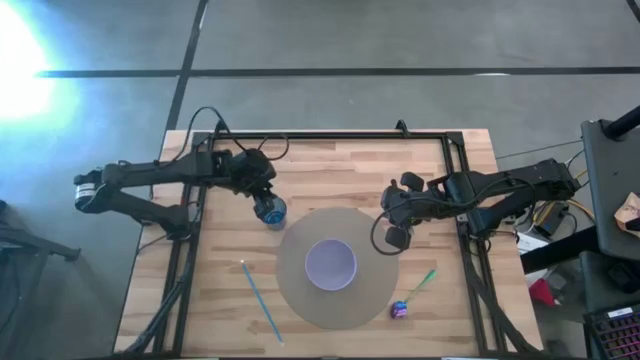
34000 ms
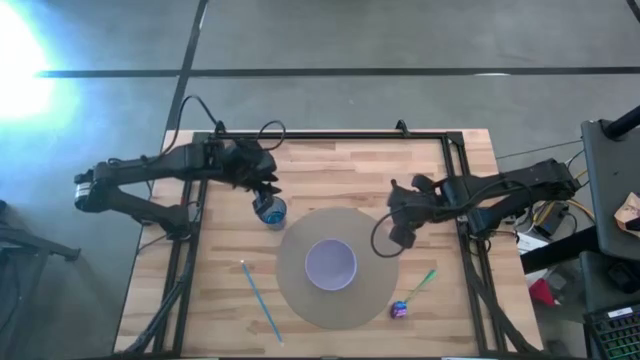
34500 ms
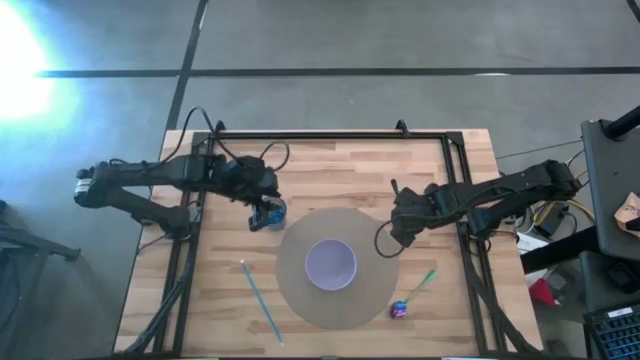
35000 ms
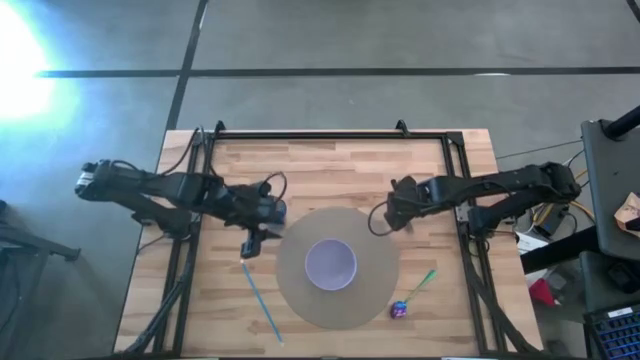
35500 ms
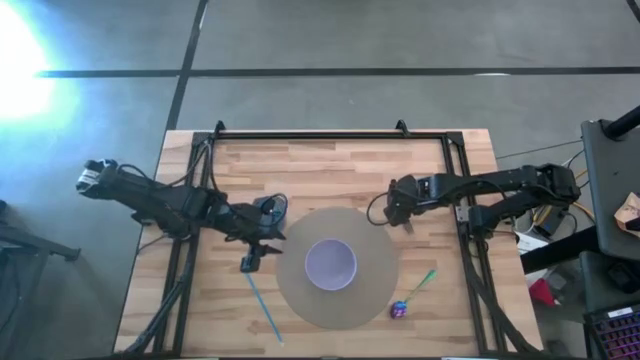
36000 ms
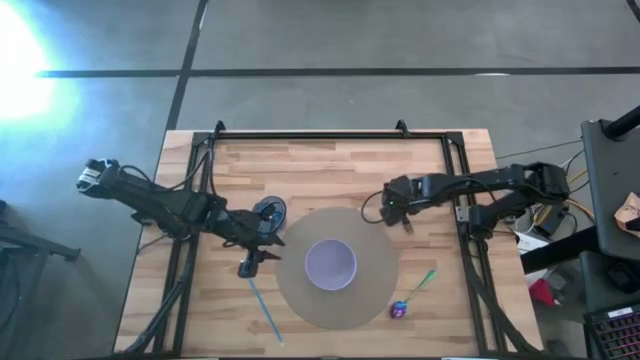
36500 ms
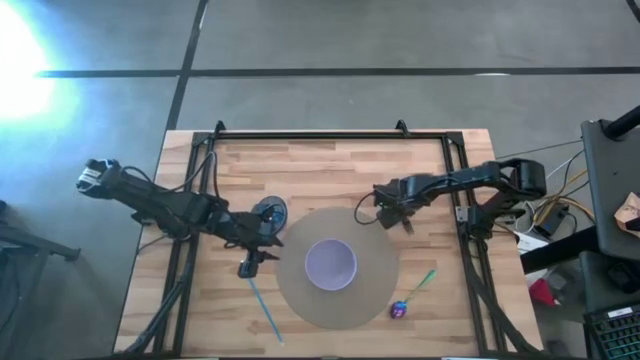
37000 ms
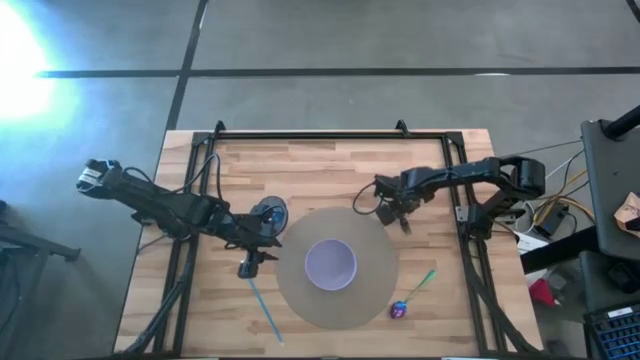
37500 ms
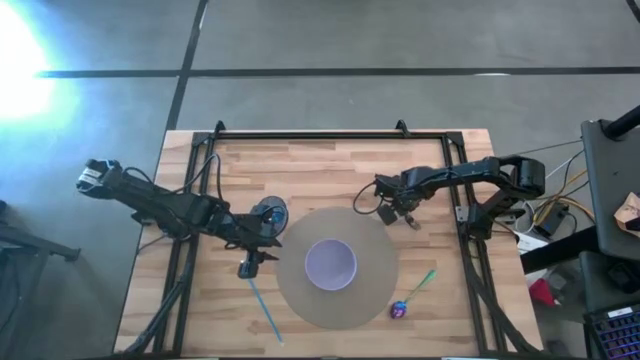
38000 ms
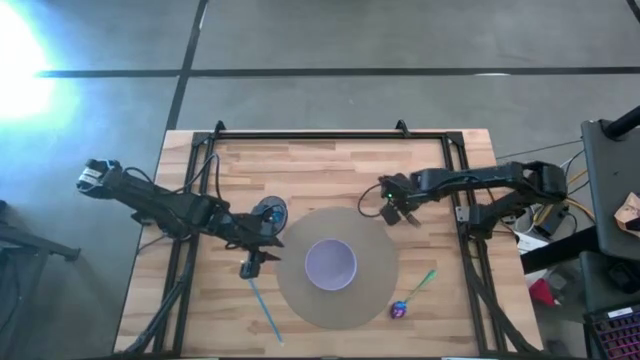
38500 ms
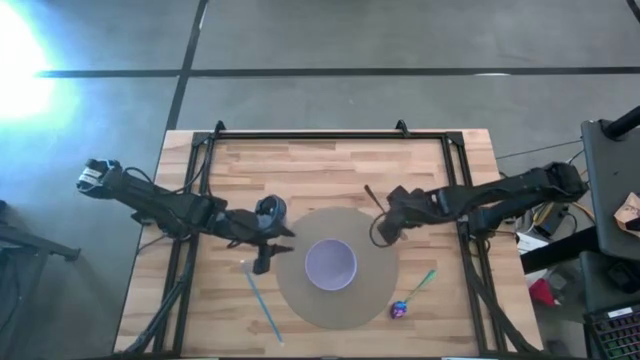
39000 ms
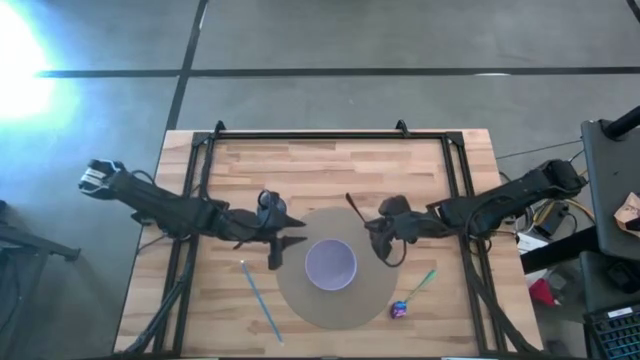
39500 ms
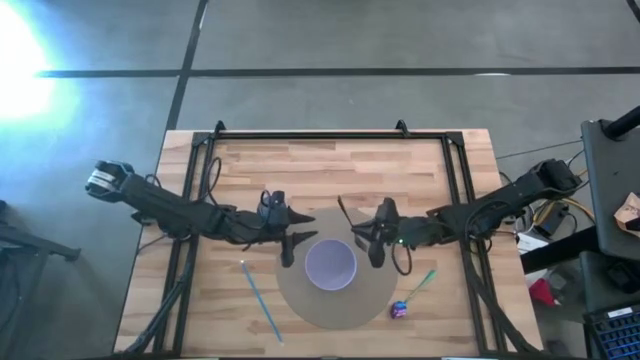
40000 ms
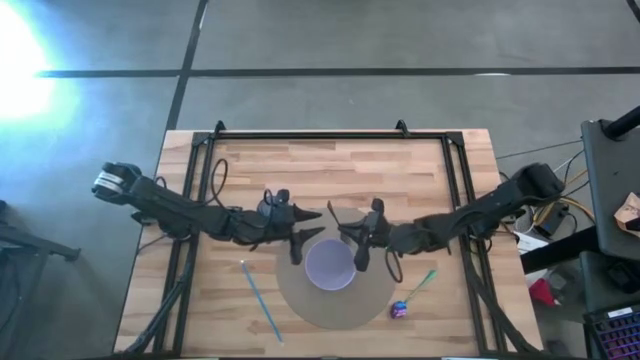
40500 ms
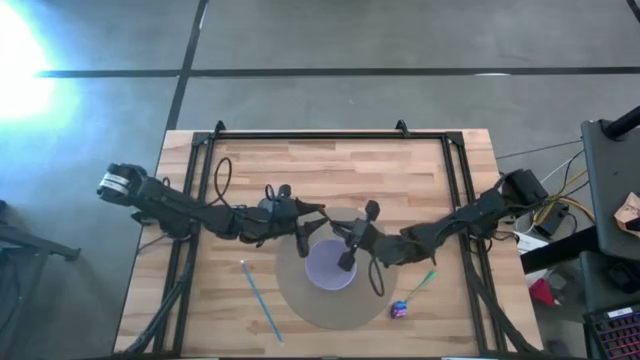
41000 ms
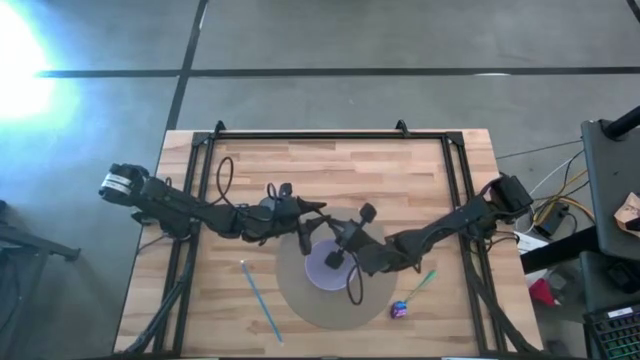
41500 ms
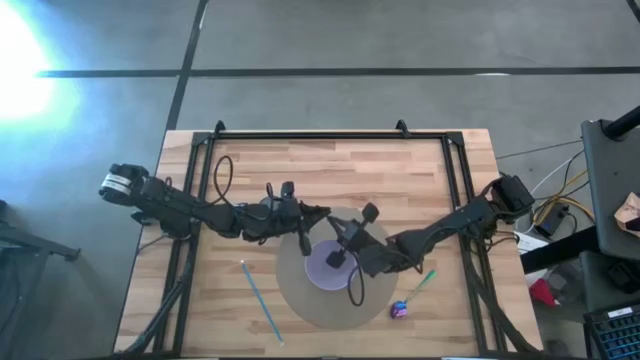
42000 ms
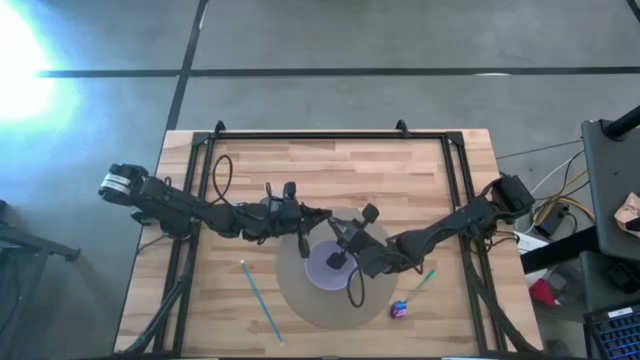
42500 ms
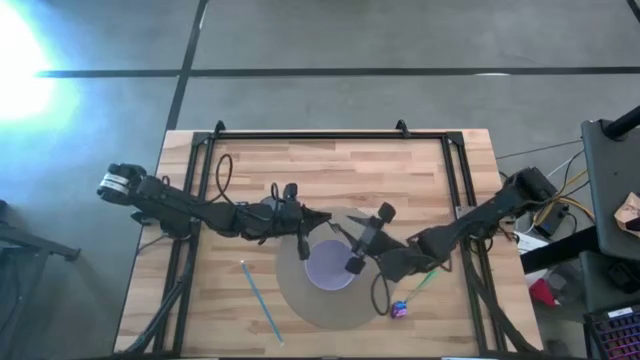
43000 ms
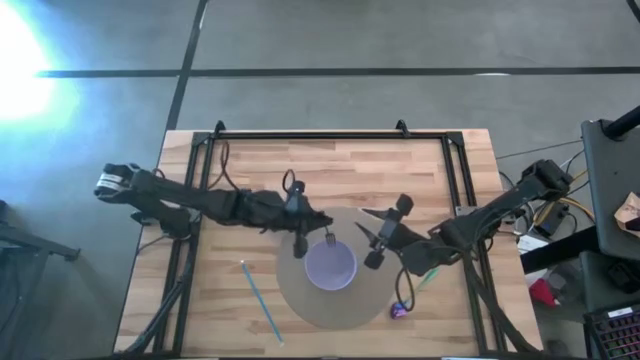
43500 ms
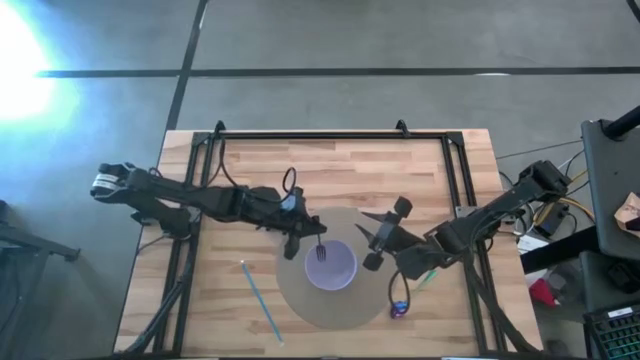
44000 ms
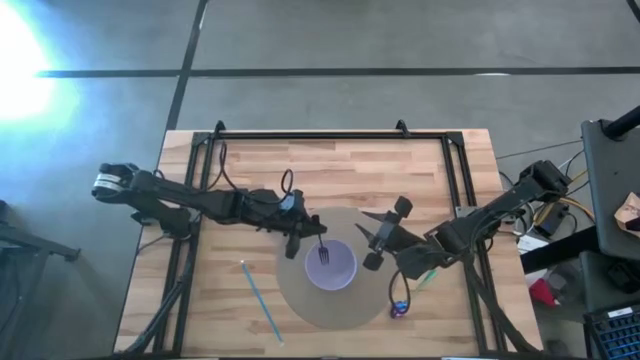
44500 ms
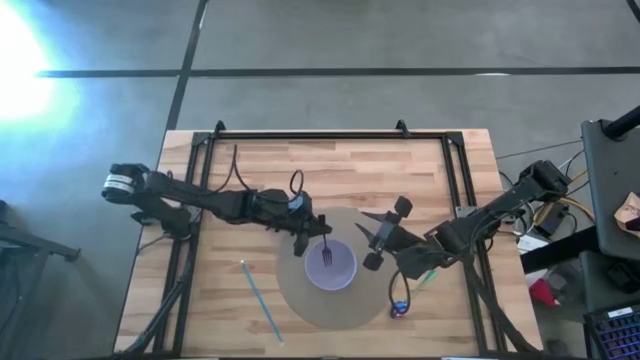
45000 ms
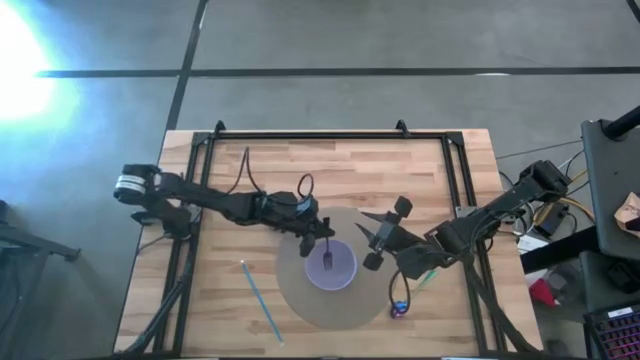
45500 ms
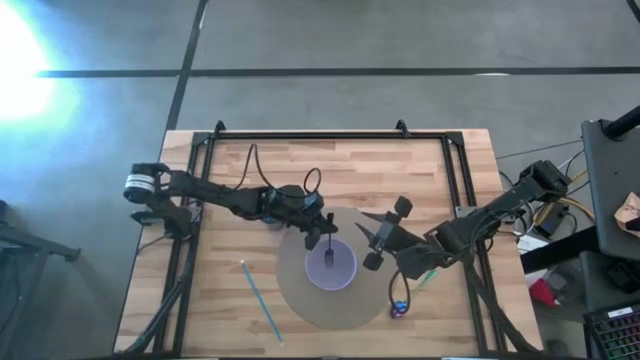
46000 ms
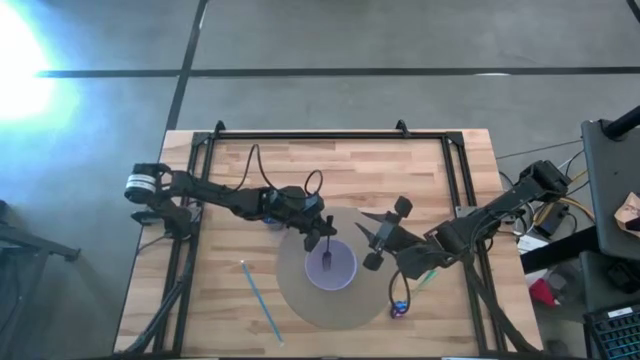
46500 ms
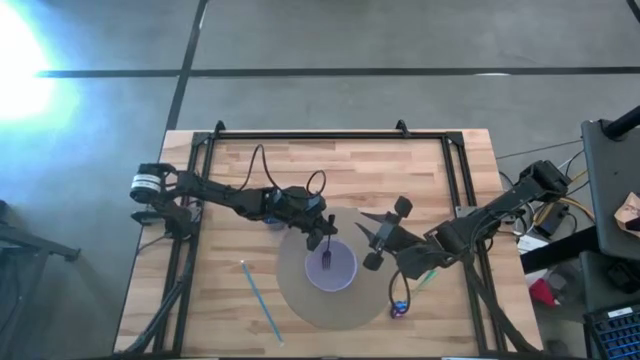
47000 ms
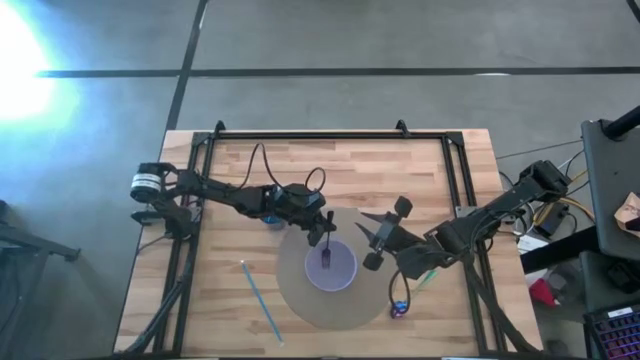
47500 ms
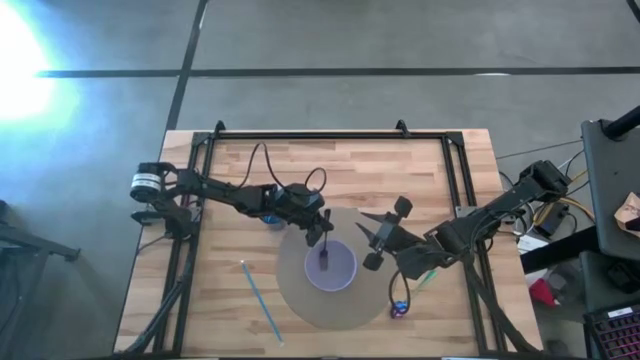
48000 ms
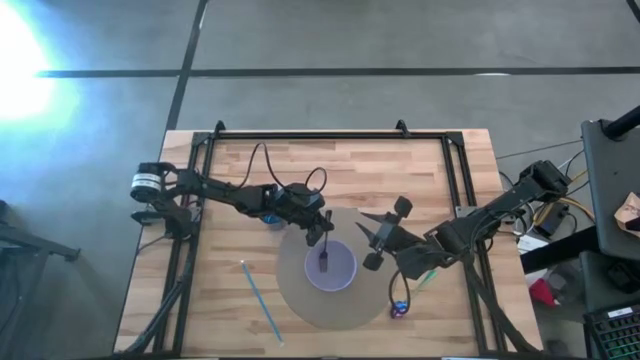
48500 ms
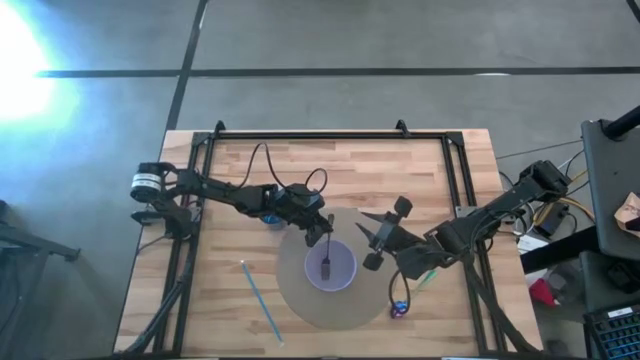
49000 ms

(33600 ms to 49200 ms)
Task: Pick & Place Utensil
Put the black fork into the violet bowl

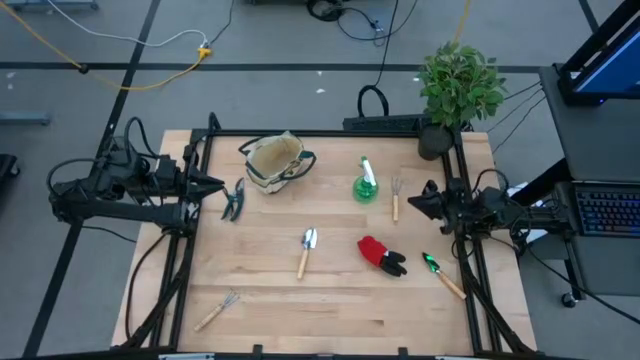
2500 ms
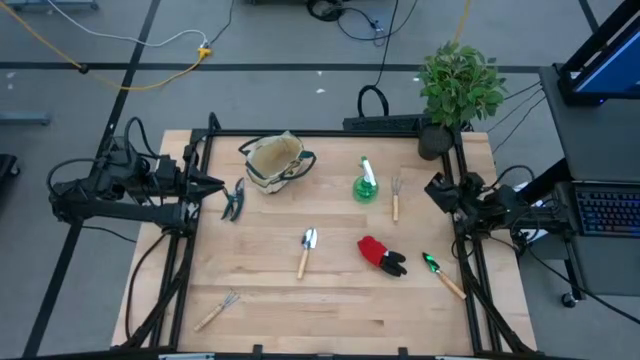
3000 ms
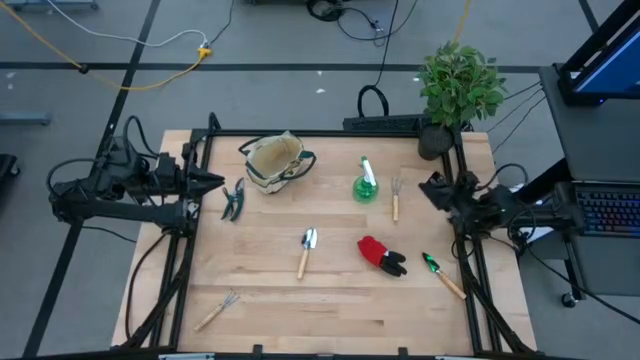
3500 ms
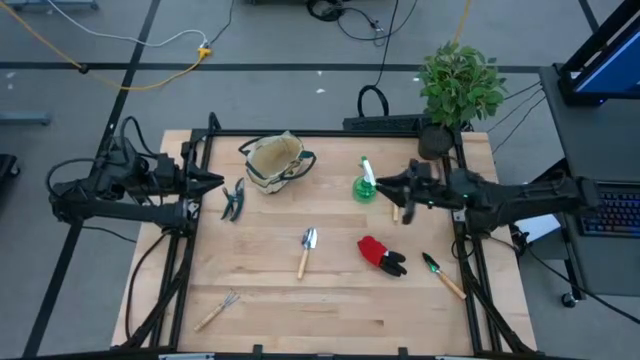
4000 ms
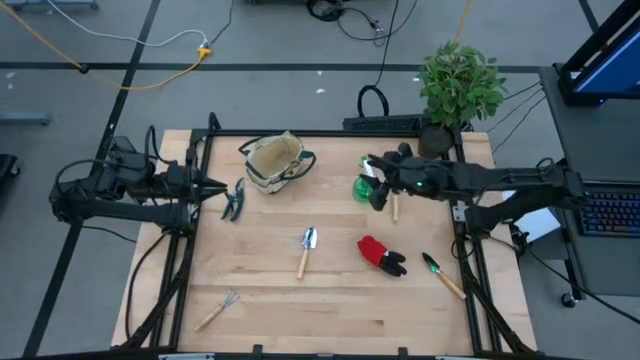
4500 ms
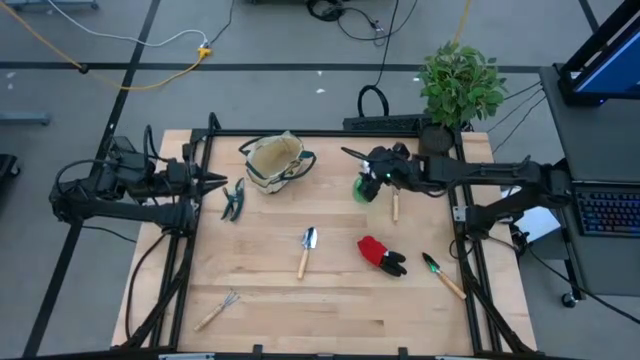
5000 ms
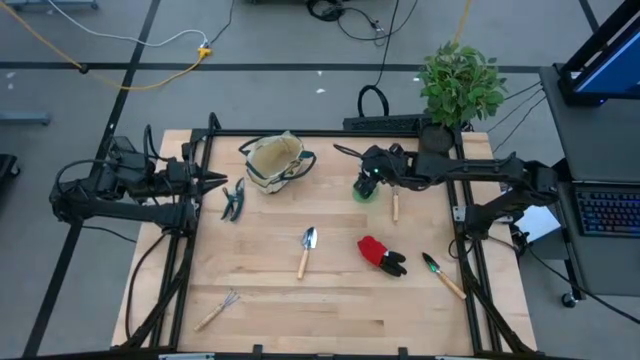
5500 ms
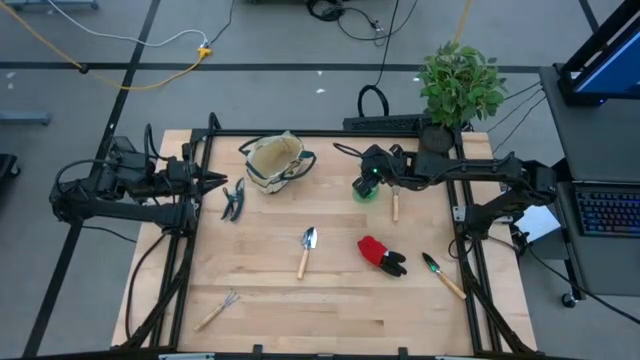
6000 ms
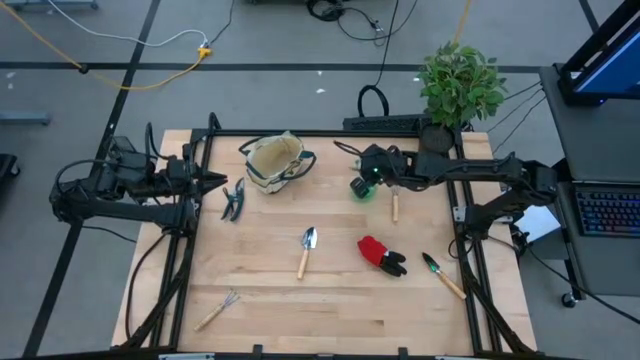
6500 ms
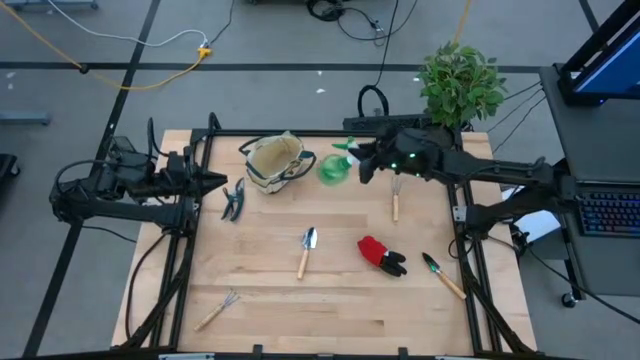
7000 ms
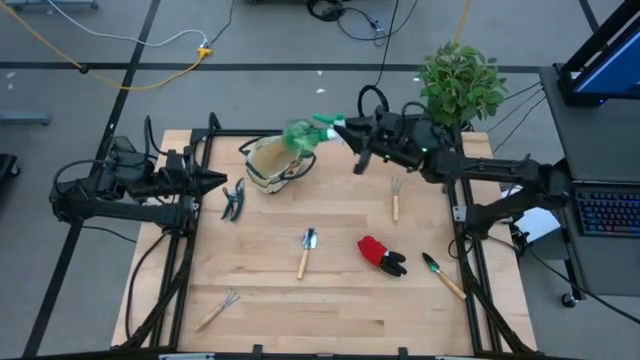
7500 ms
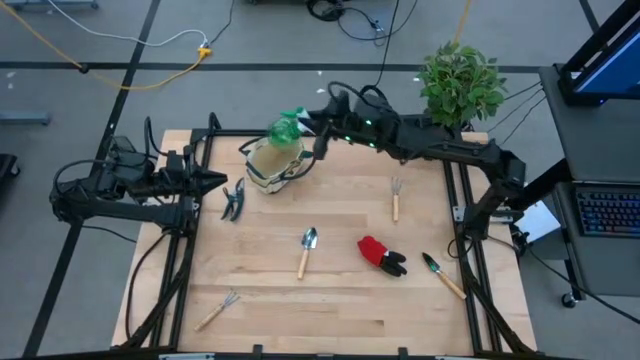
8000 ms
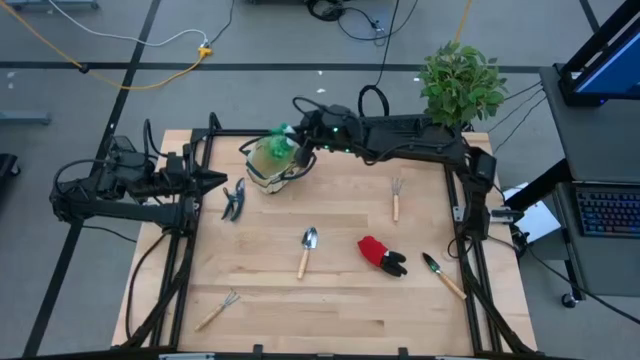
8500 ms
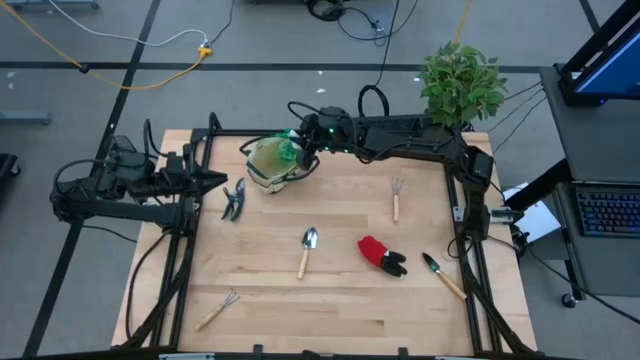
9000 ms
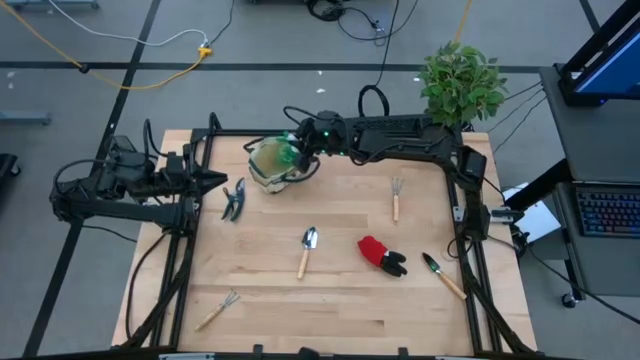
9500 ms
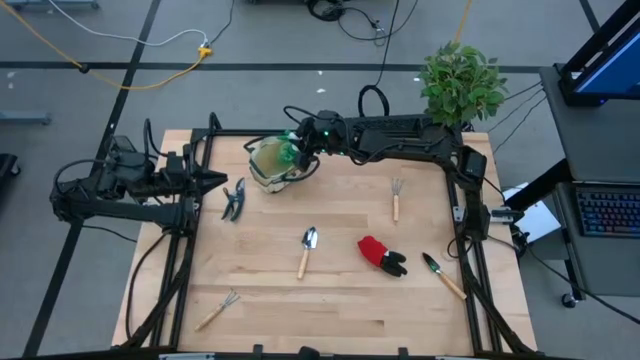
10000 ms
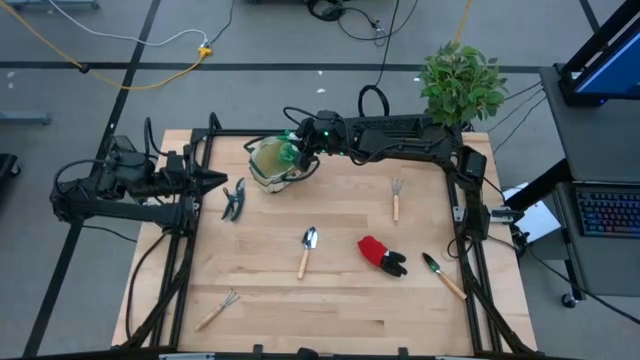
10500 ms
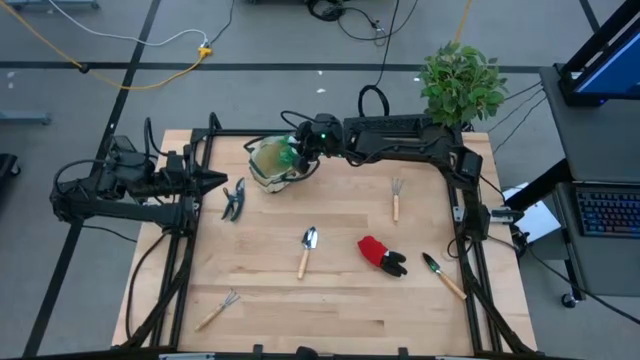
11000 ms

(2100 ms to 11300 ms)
Task: Pick & Place Garden tools in Gardening bag
Put the spray bottle into the gardening bag
